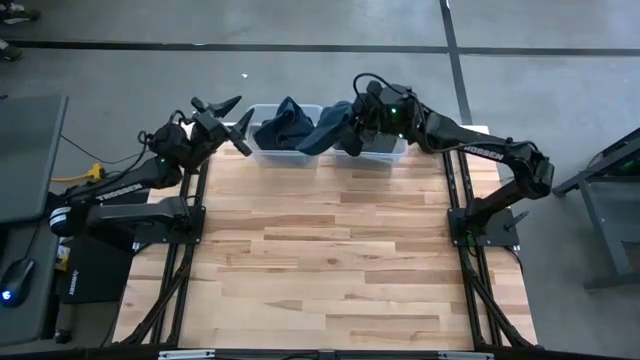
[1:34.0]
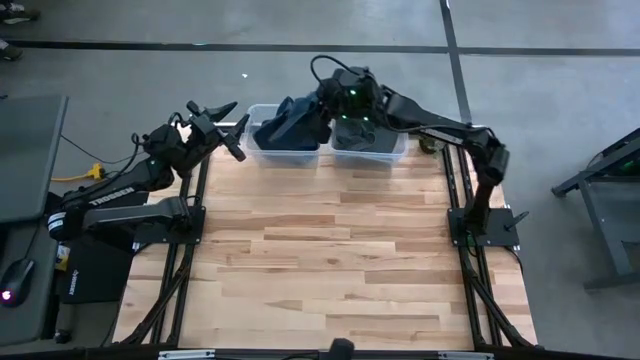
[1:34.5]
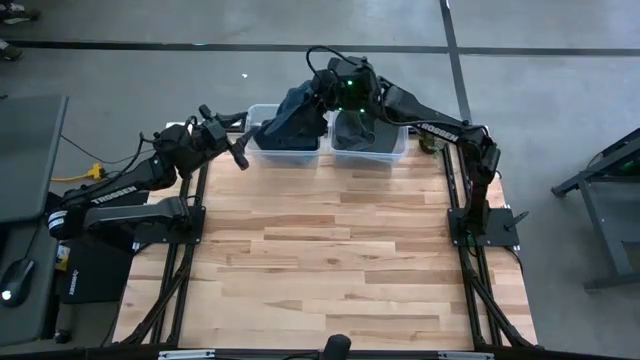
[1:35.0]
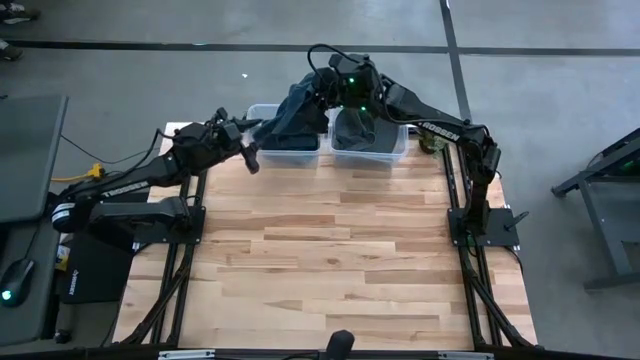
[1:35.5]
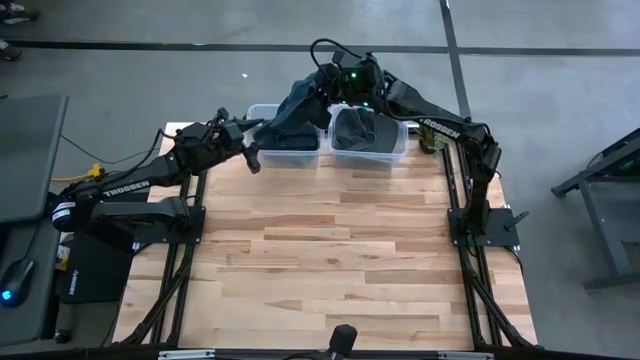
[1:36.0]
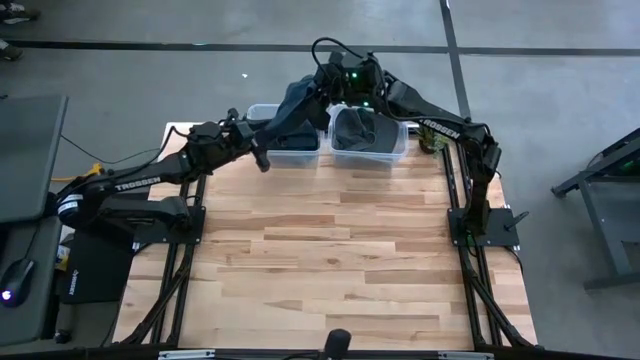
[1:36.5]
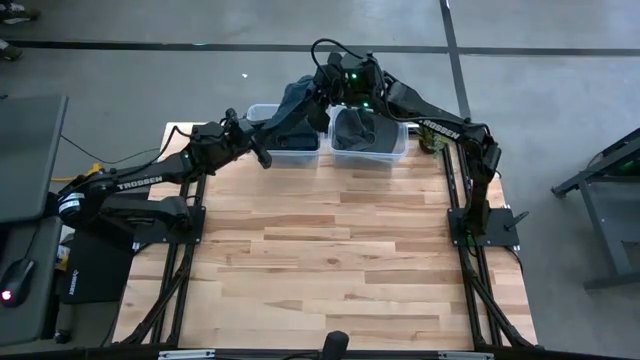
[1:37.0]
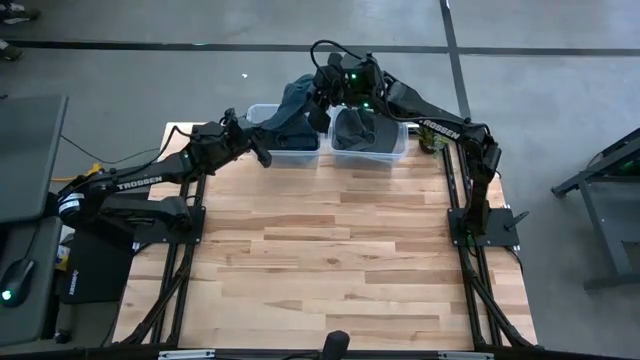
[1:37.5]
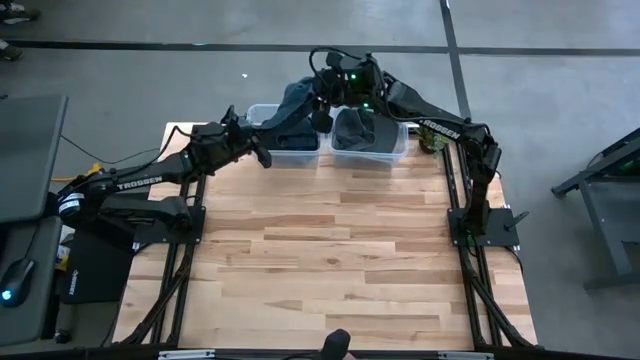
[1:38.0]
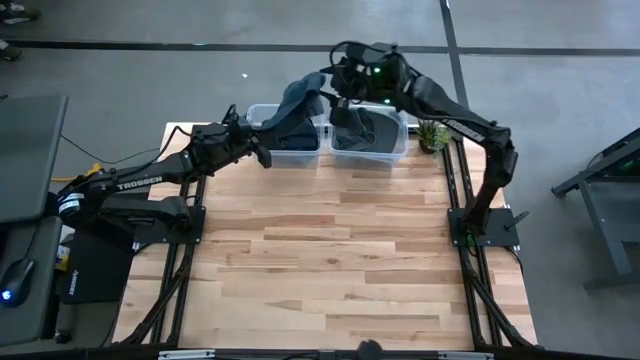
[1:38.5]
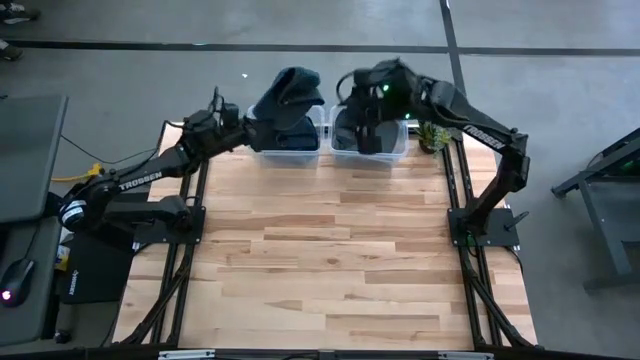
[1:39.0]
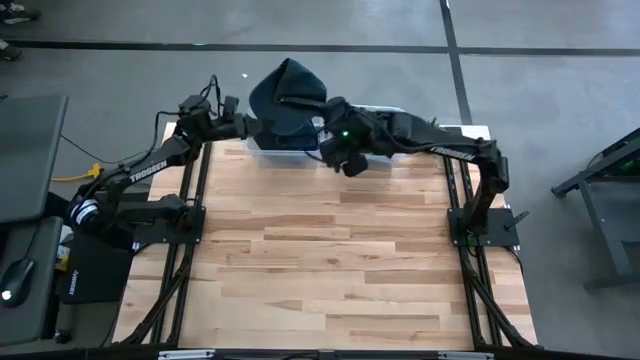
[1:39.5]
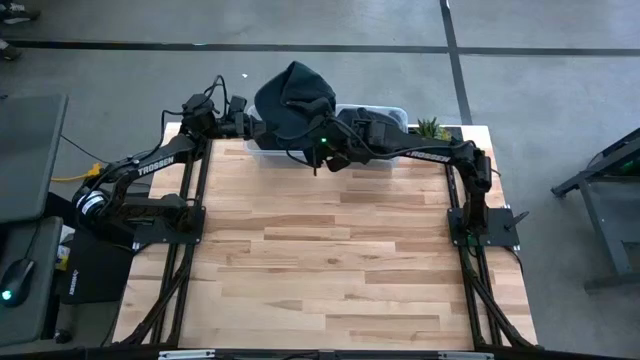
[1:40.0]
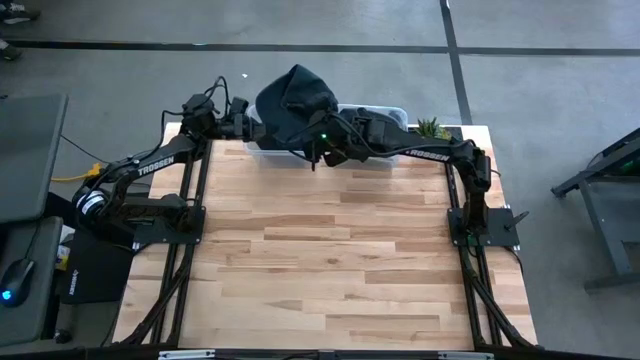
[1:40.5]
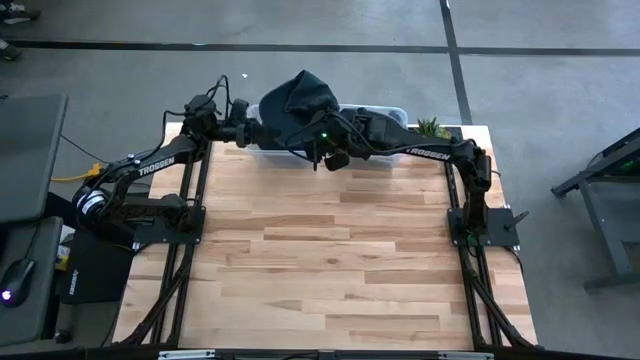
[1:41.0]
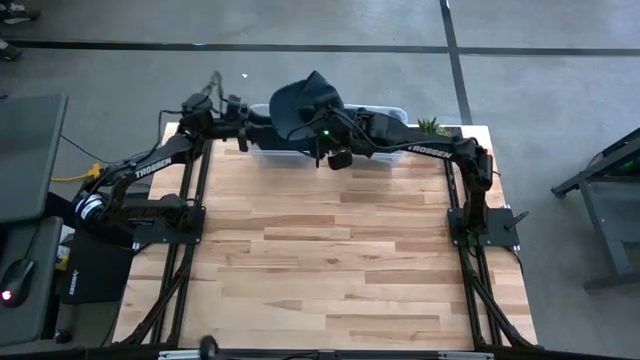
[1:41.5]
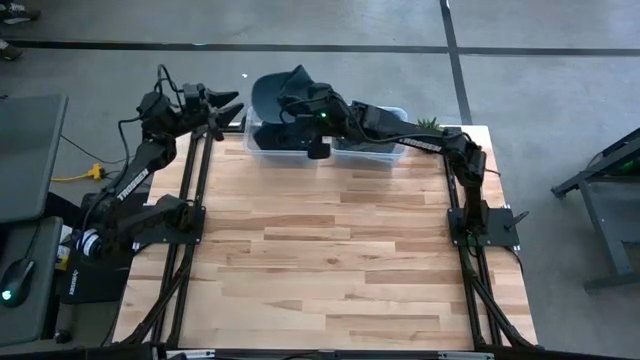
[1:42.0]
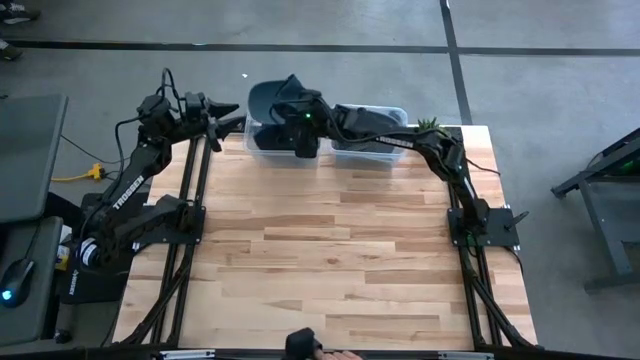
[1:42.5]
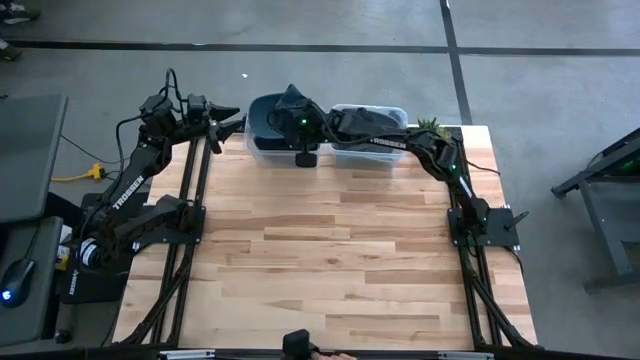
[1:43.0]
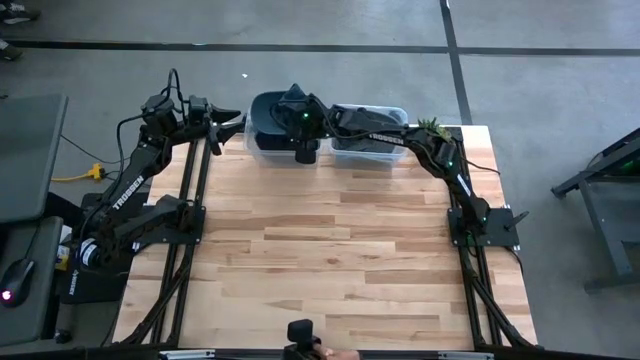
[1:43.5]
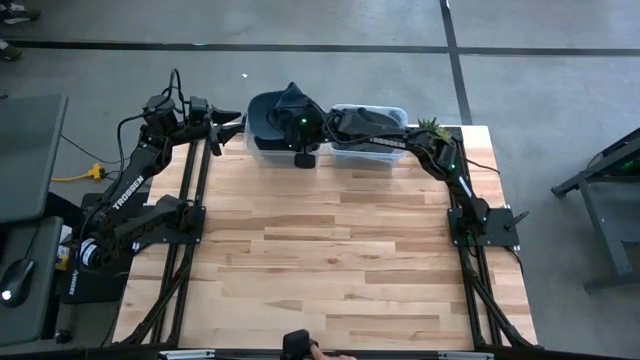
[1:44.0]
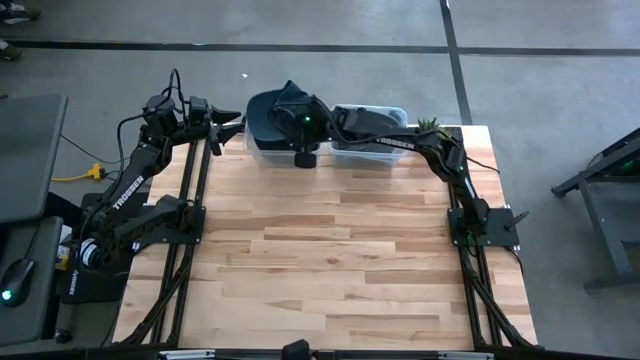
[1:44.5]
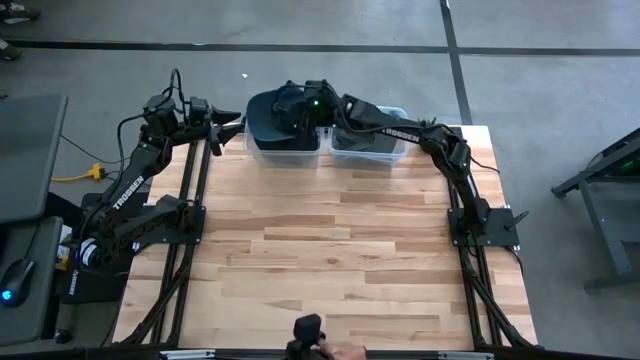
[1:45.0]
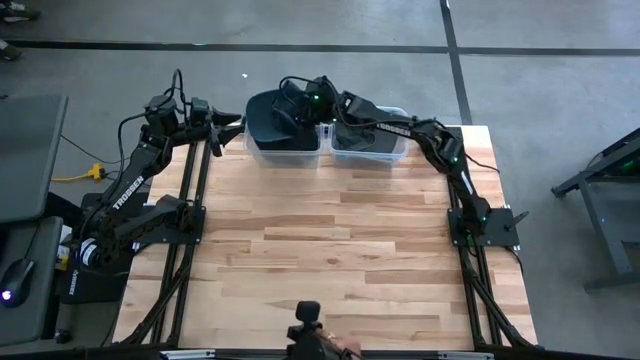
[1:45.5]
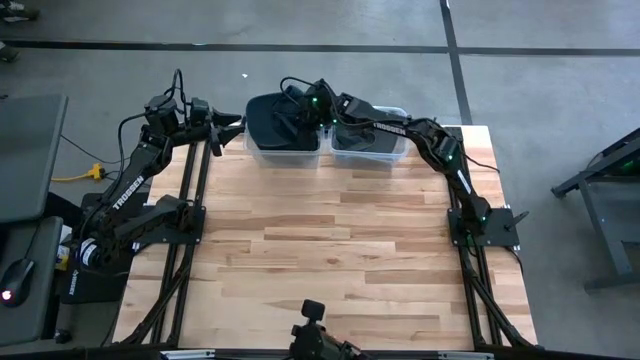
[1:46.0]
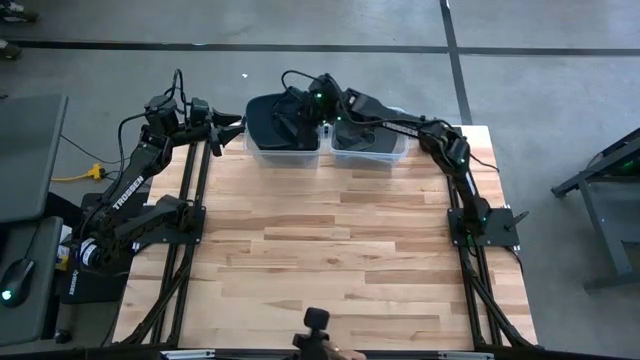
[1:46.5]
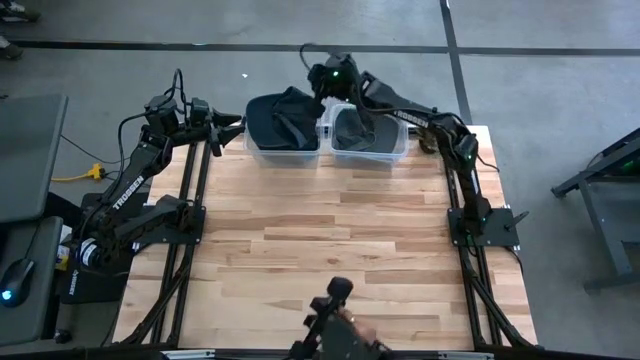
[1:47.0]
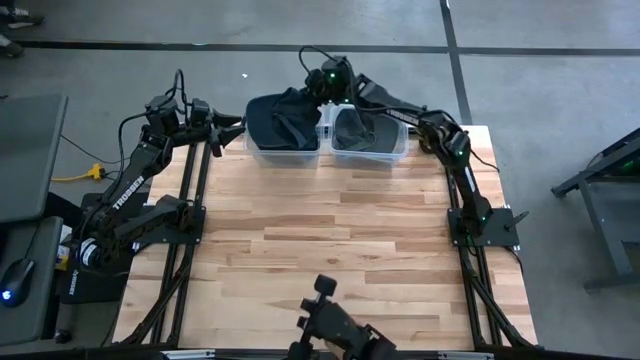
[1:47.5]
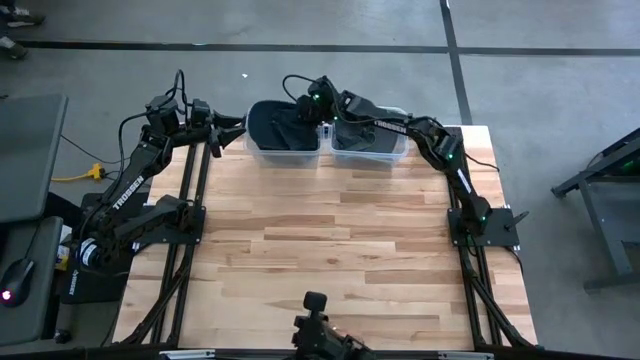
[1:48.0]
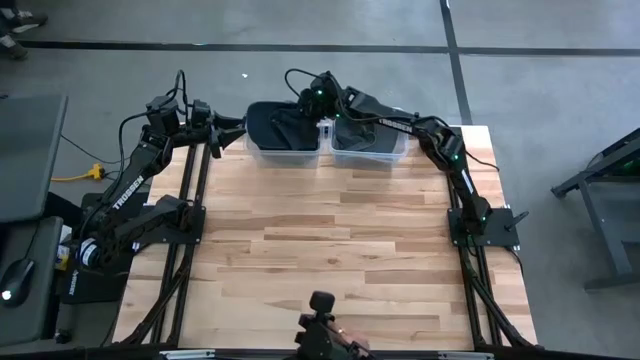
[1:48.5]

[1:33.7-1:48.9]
Task: Pick and place caps into container
Put the dark blue cap into the left transparent container

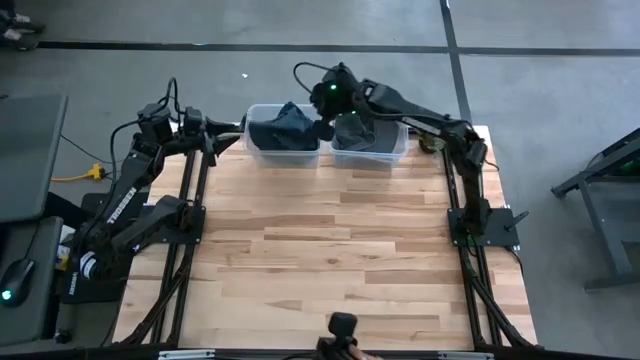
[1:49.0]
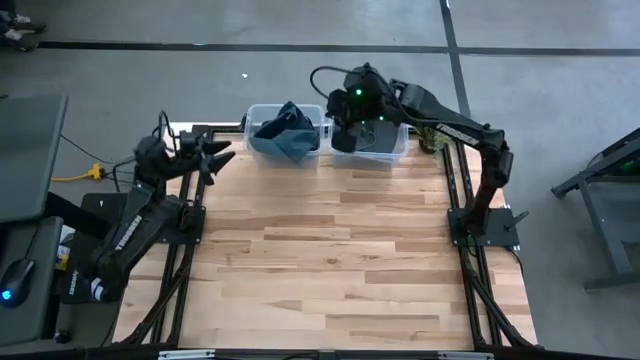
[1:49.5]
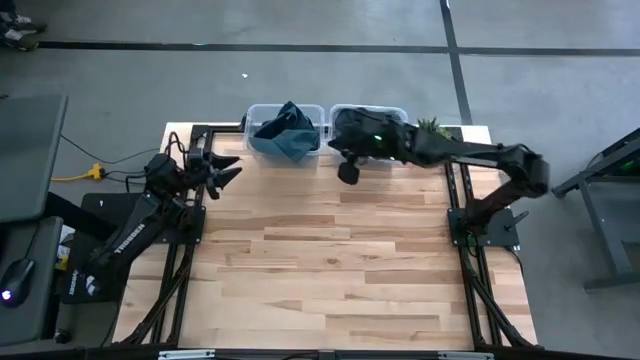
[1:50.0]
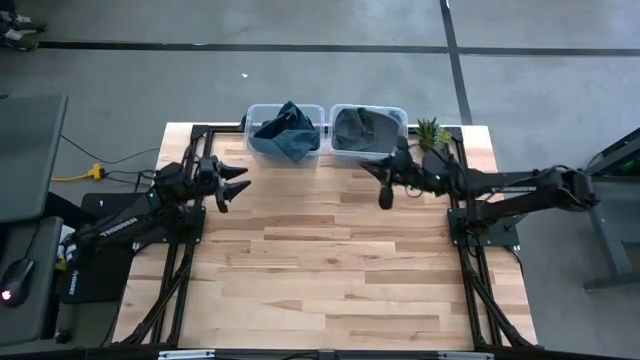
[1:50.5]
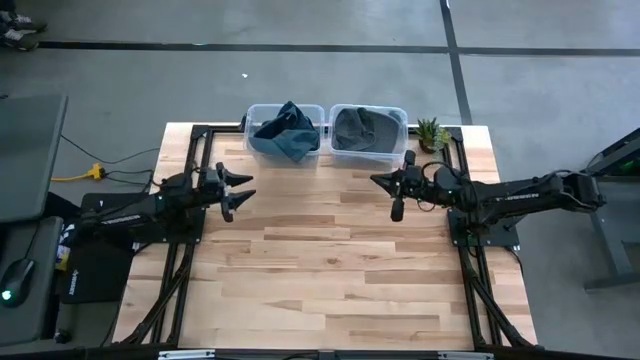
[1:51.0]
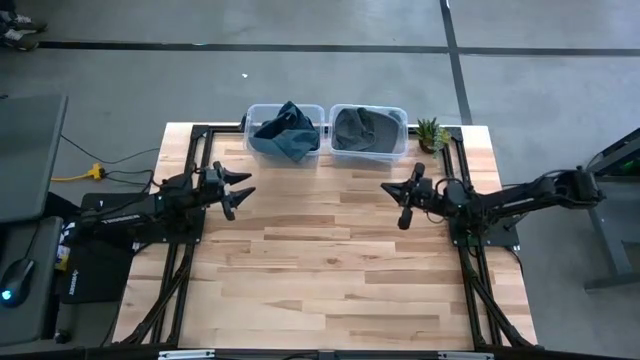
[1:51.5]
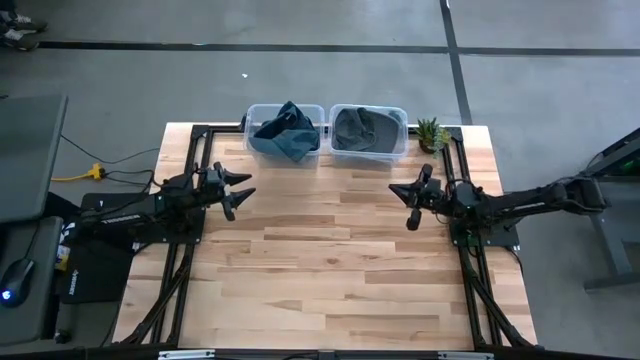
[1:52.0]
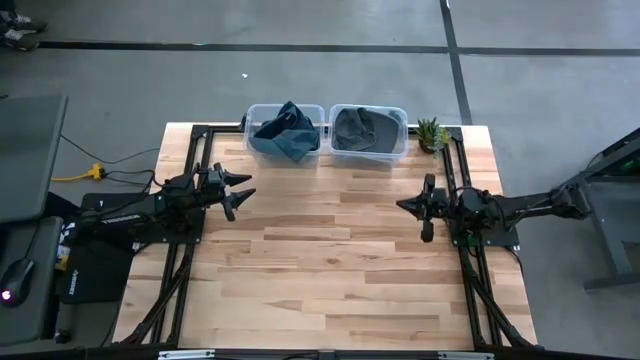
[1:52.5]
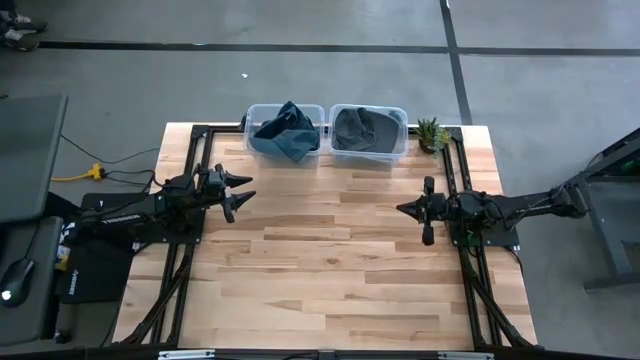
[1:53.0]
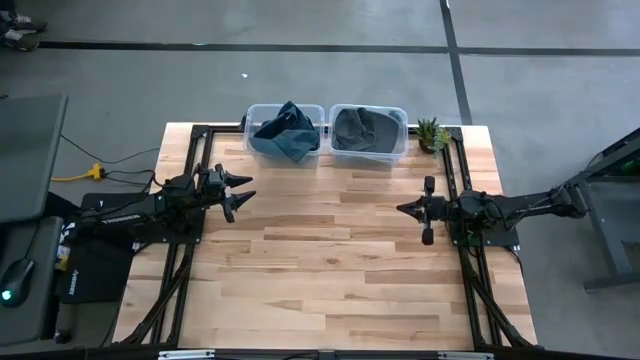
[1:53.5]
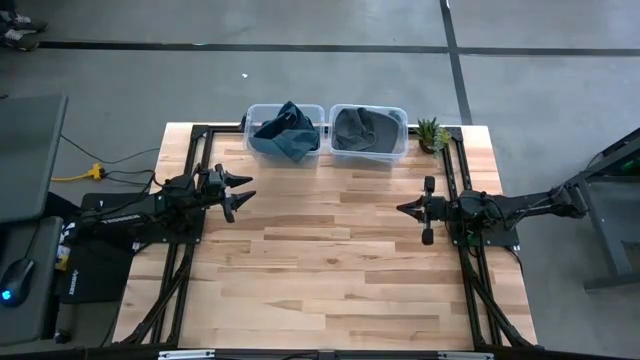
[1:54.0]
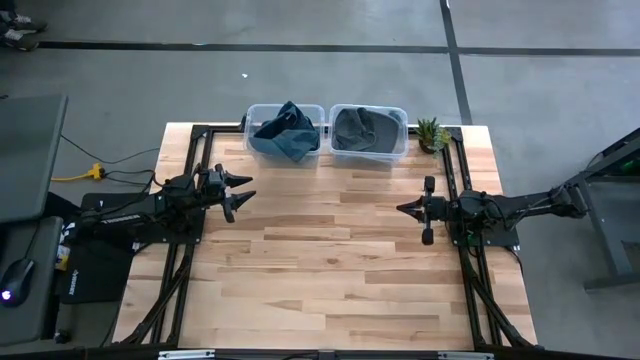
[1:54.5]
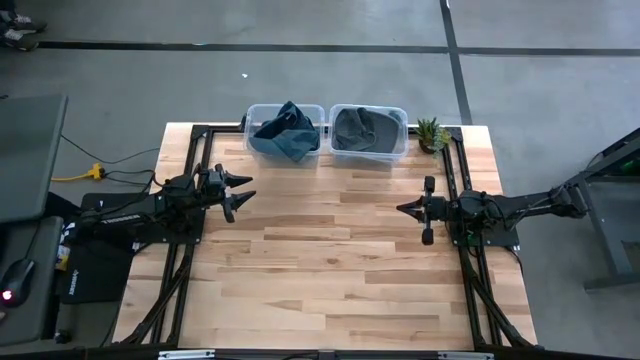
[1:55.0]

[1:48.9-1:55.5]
Return to Home Position
